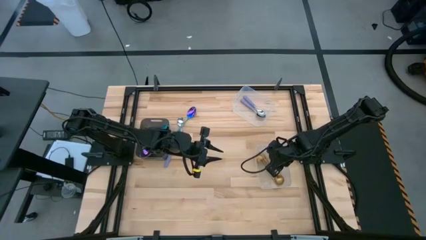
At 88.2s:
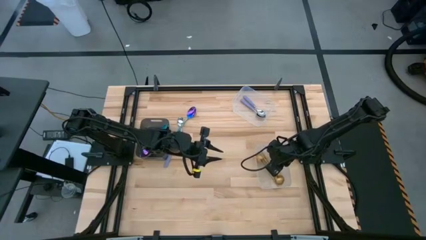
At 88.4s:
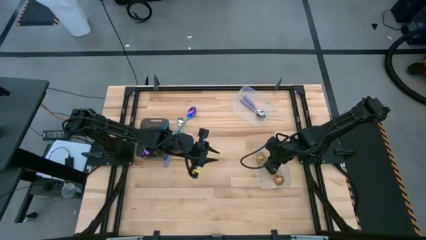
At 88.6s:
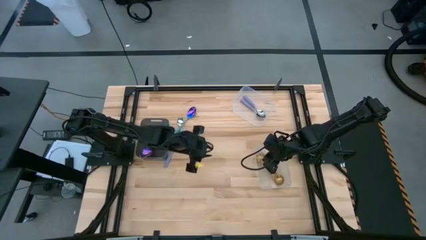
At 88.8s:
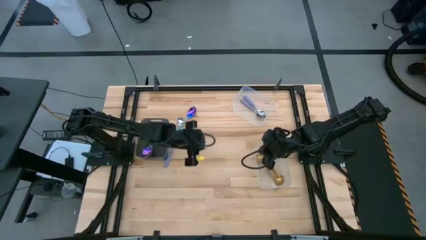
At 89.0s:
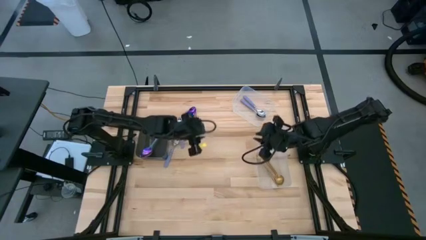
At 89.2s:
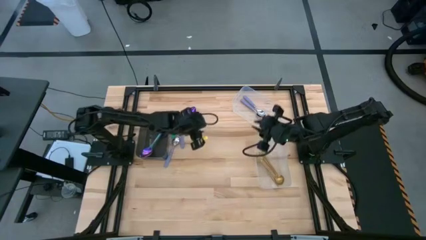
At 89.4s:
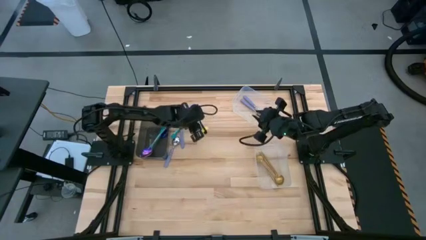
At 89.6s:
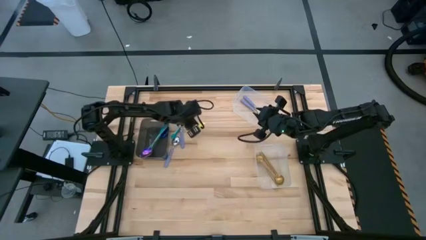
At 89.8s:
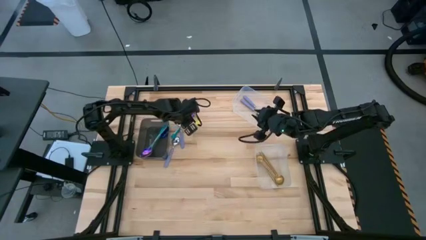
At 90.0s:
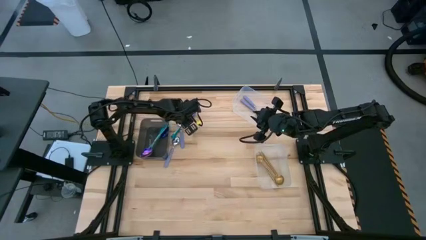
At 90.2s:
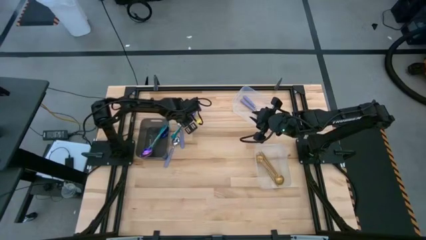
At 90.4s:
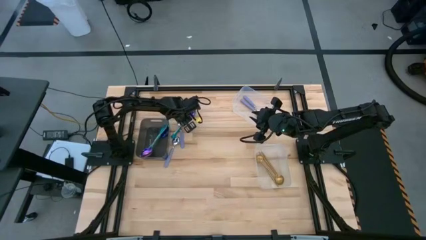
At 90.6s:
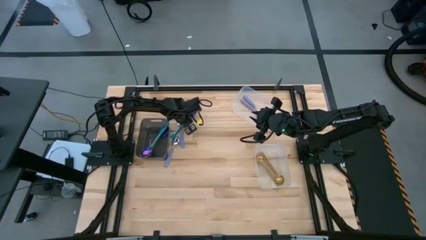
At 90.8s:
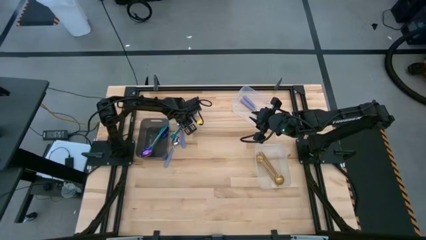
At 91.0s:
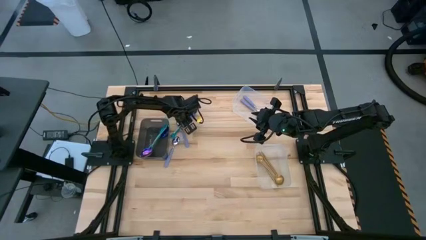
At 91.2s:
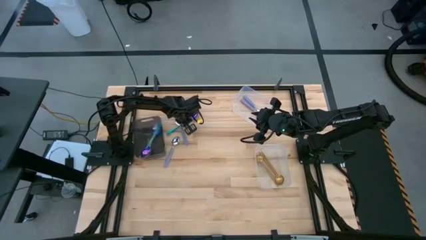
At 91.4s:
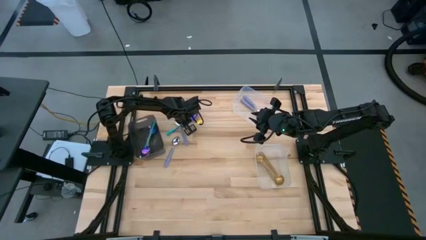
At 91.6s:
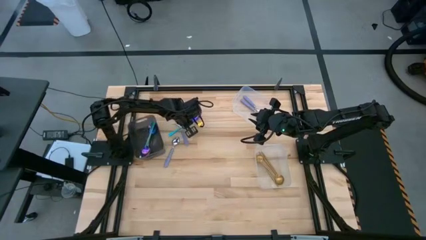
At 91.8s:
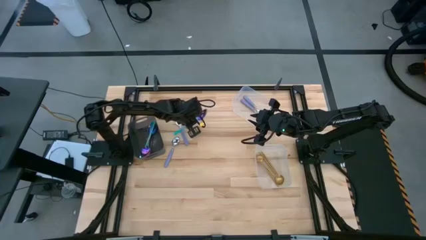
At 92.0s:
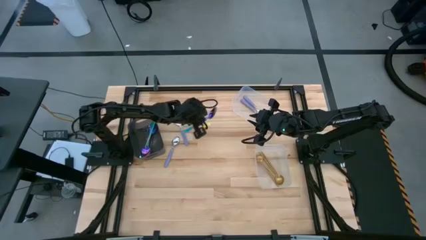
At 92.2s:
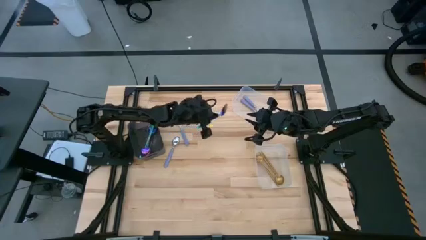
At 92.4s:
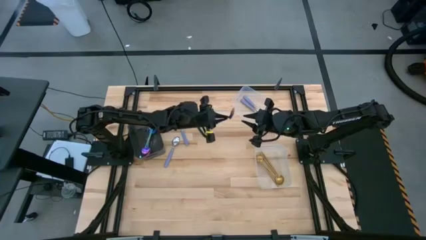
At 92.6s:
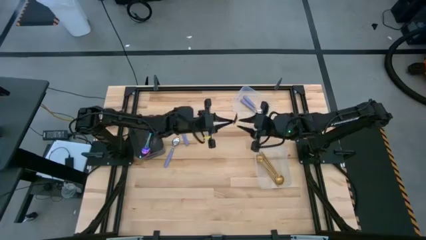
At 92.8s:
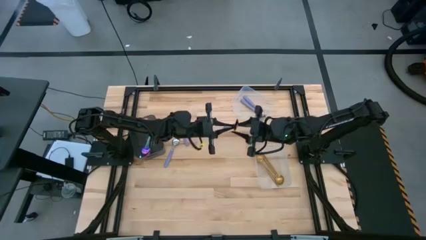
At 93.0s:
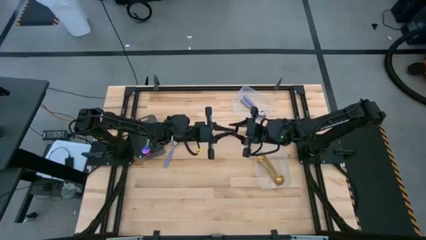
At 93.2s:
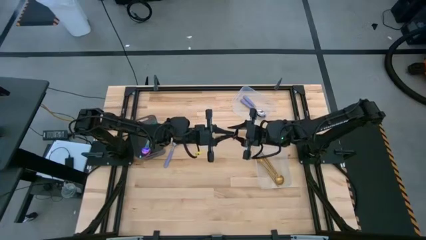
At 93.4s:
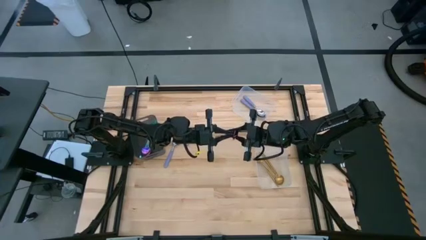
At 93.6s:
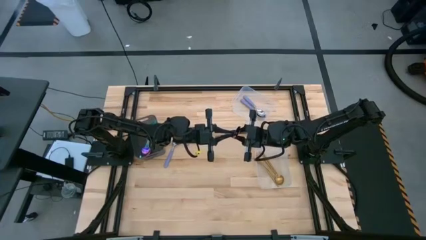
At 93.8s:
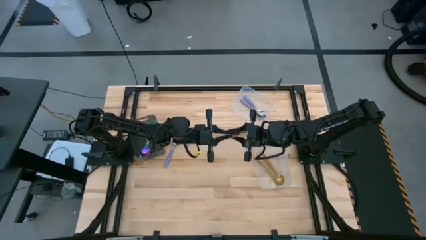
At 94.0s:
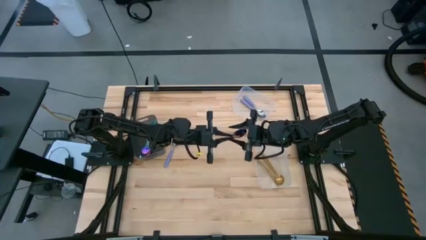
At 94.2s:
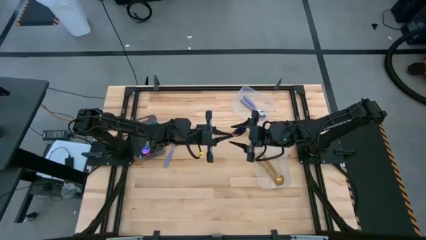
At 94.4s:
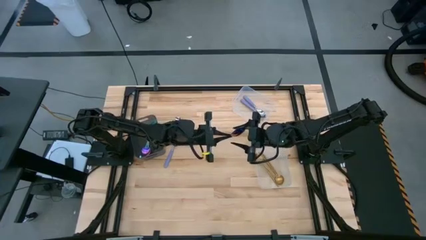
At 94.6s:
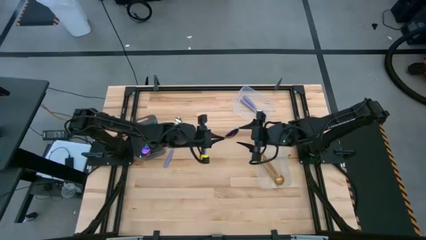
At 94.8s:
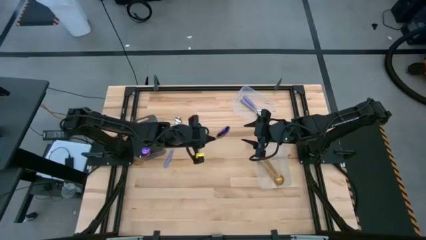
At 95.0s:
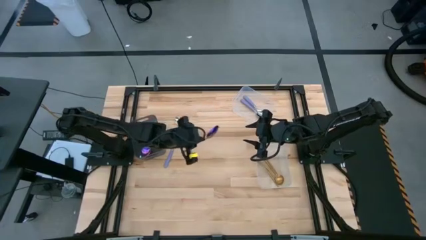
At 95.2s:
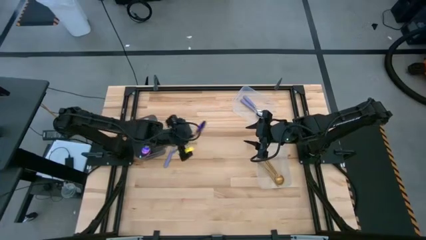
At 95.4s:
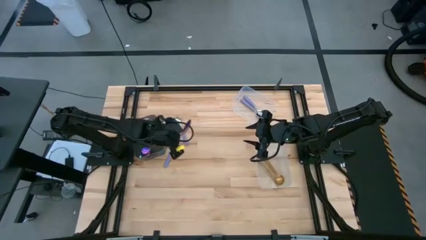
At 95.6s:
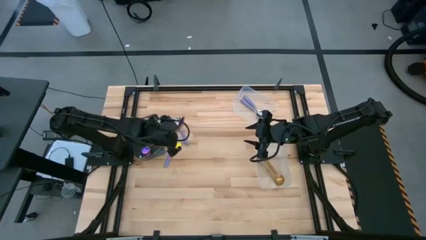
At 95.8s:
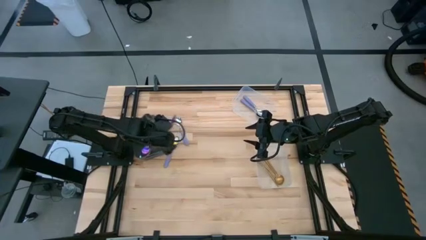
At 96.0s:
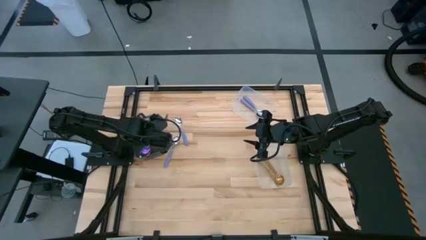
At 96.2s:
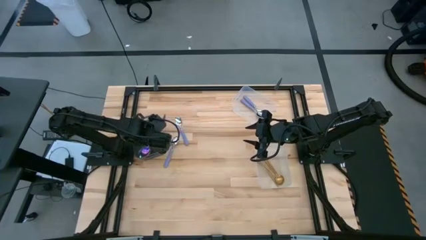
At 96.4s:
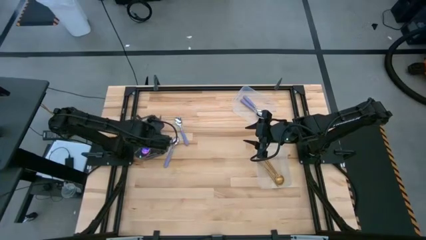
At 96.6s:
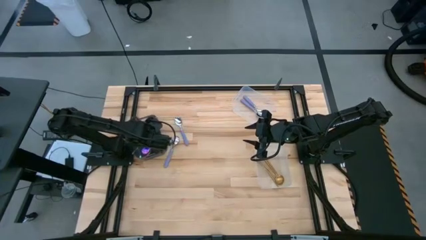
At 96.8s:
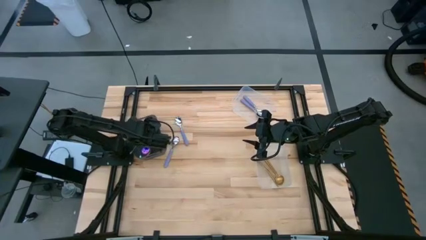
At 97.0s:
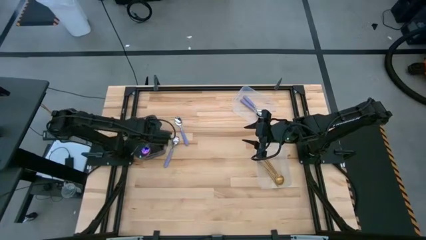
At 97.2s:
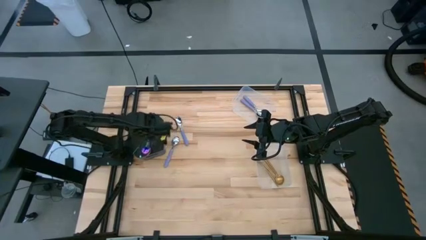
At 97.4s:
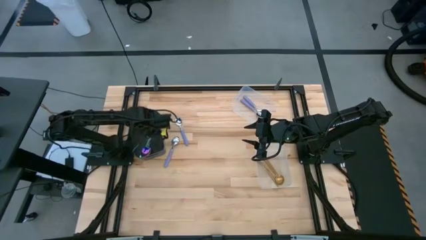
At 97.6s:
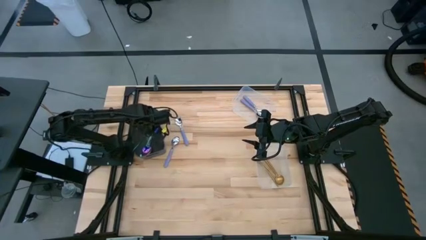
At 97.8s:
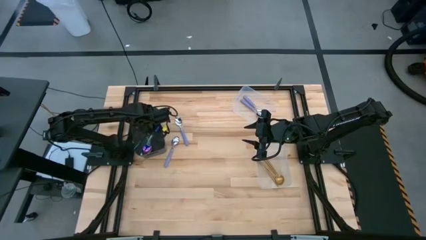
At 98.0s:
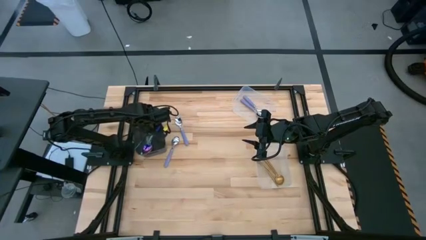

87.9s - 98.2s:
Task: Sort silverware by color (type)
Put the blue spoon into the black bin
